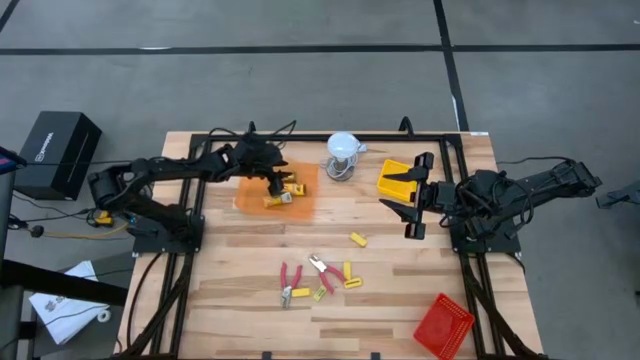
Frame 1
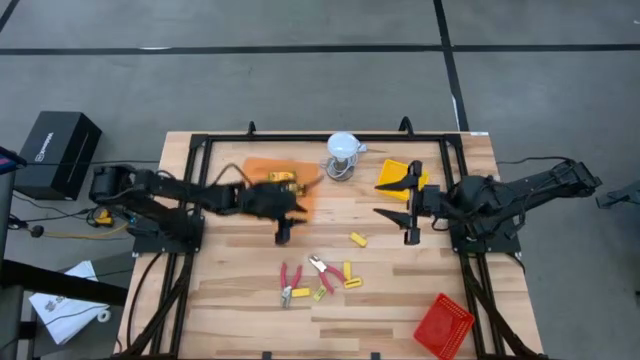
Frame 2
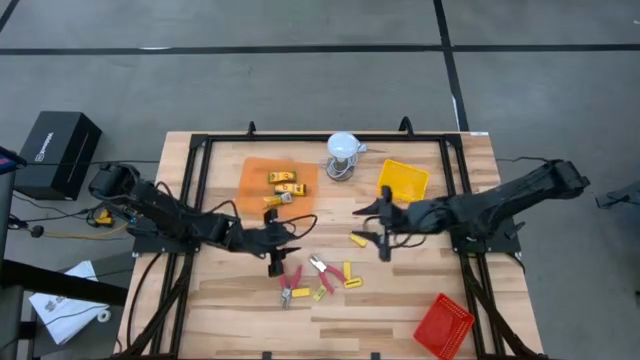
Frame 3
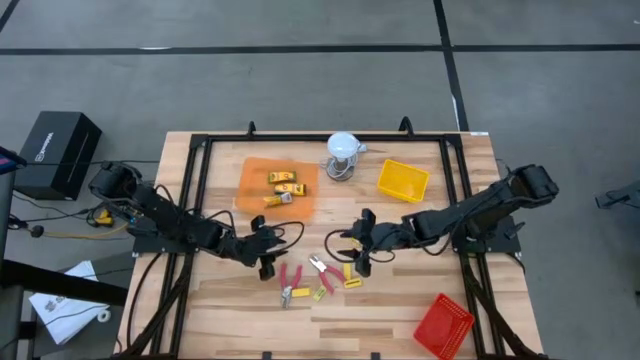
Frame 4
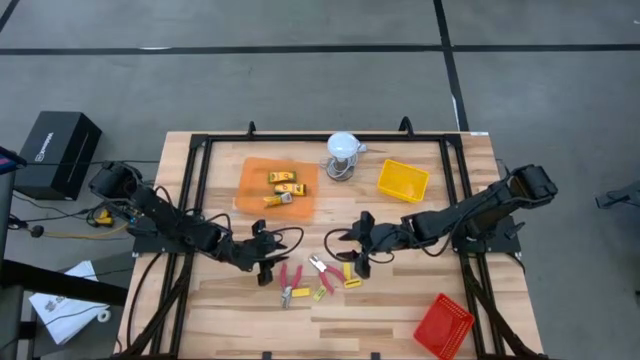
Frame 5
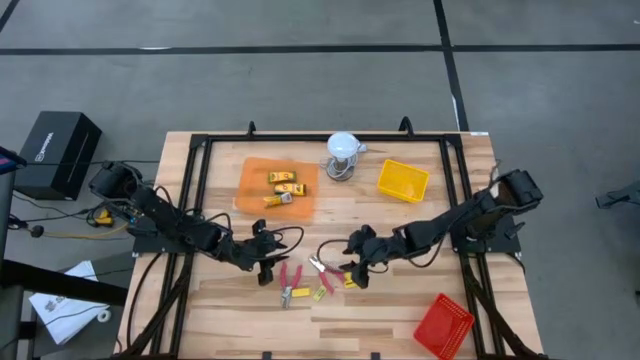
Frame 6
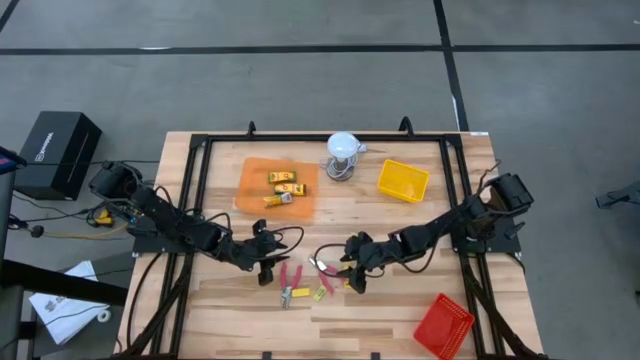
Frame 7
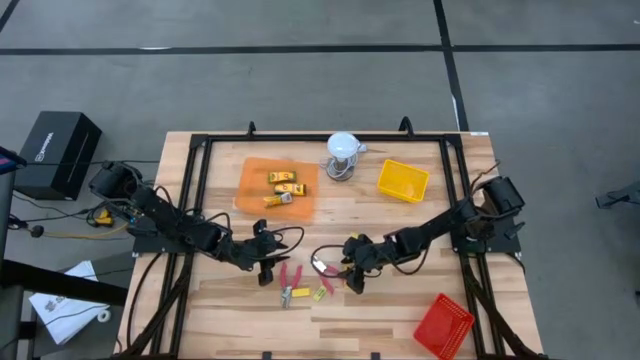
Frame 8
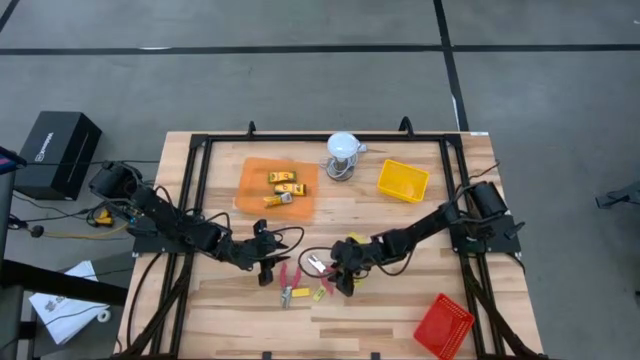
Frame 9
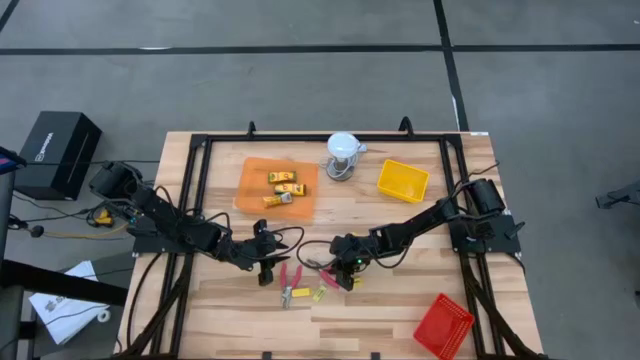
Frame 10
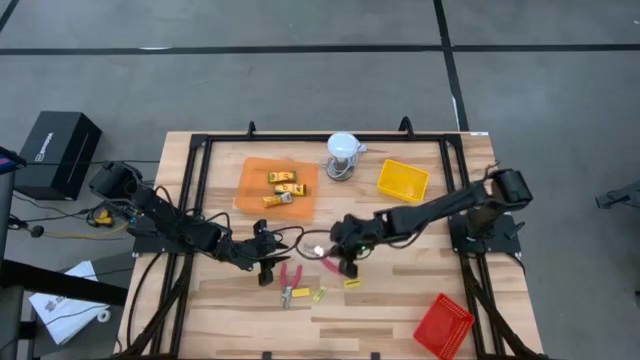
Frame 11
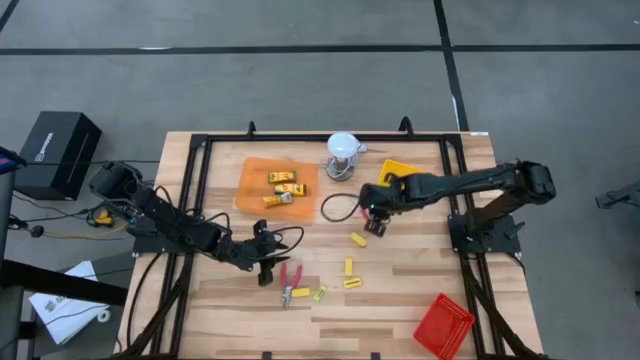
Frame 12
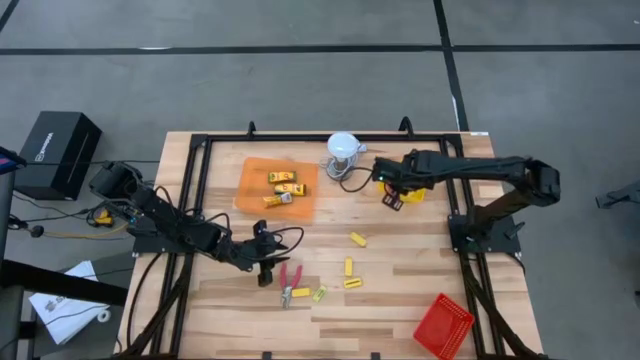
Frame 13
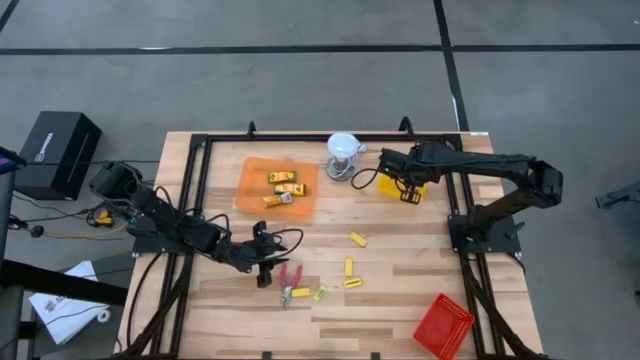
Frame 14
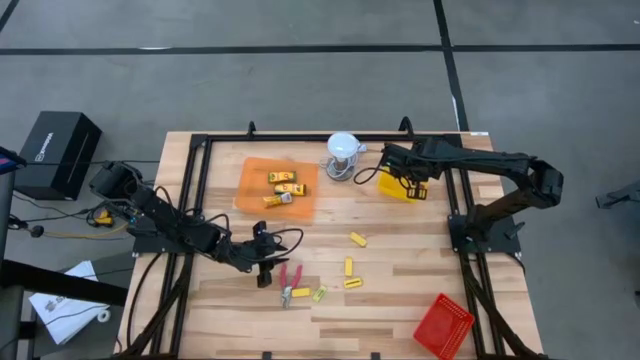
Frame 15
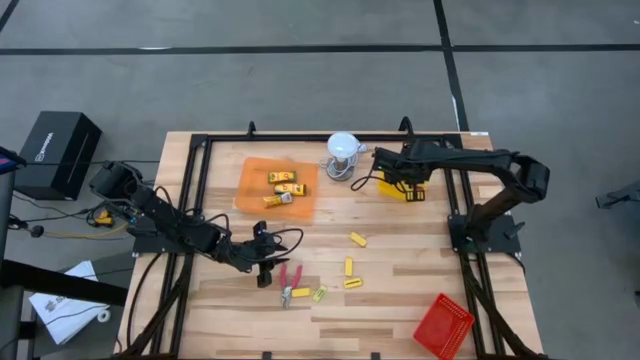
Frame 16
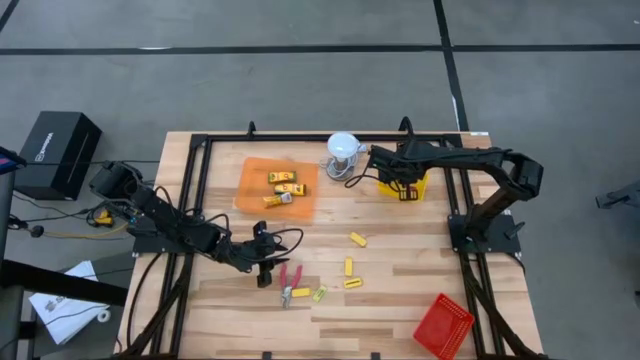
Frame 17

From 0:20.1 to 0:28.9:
Task: Pick & Place School Supplies
Put the pink hole puncher into the yellow bin

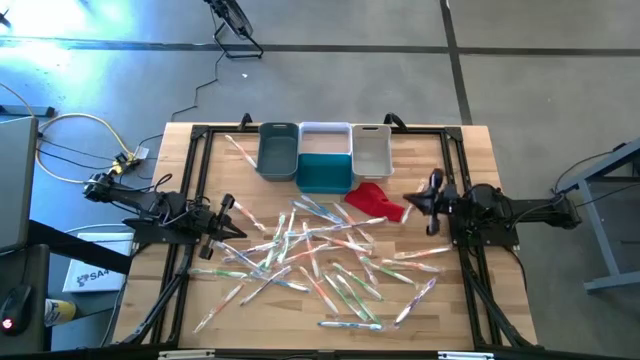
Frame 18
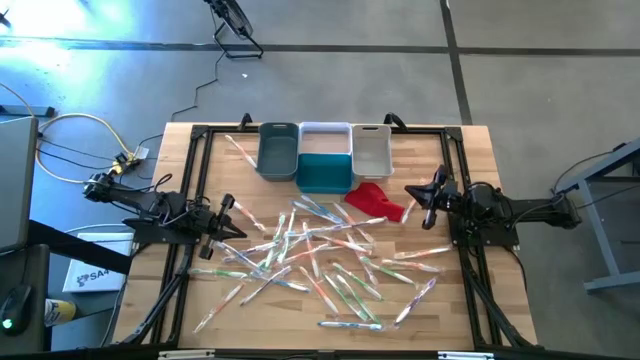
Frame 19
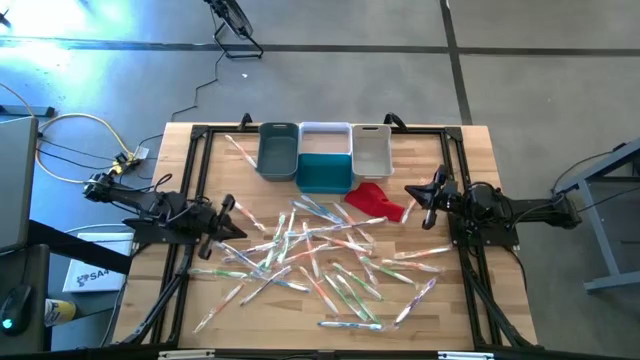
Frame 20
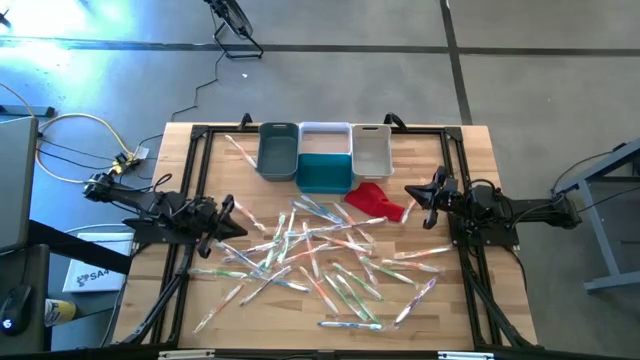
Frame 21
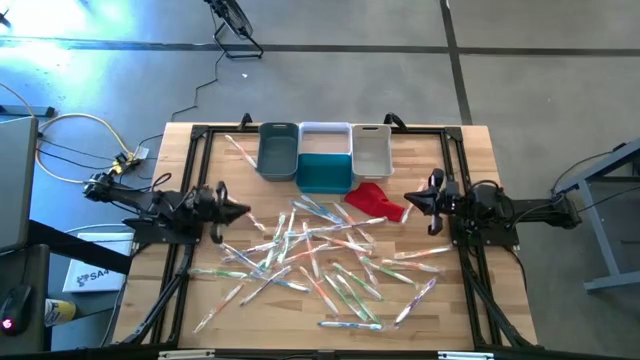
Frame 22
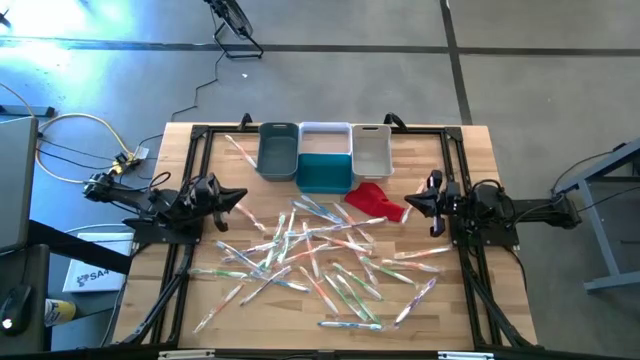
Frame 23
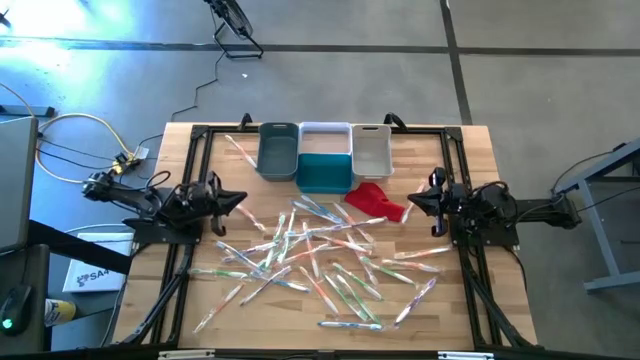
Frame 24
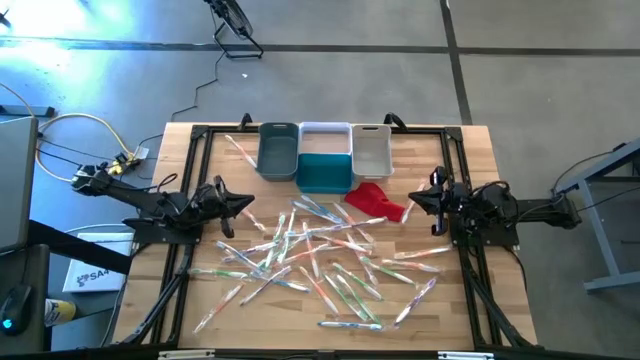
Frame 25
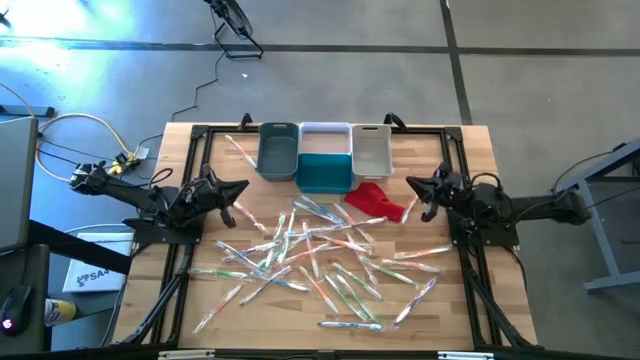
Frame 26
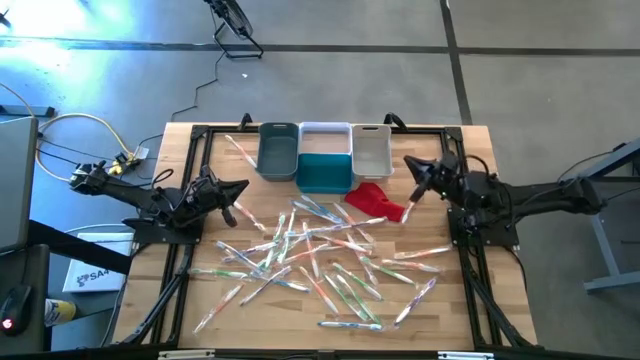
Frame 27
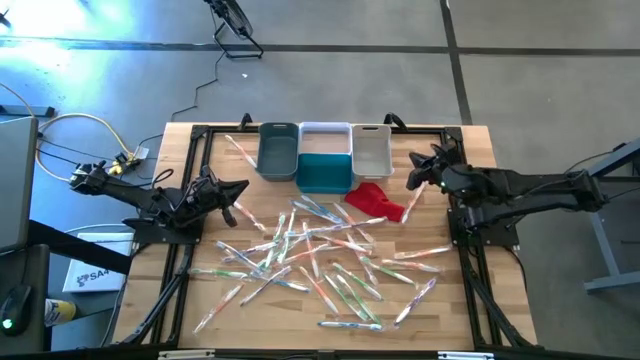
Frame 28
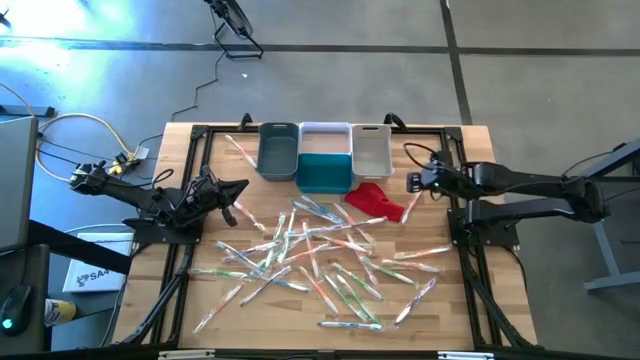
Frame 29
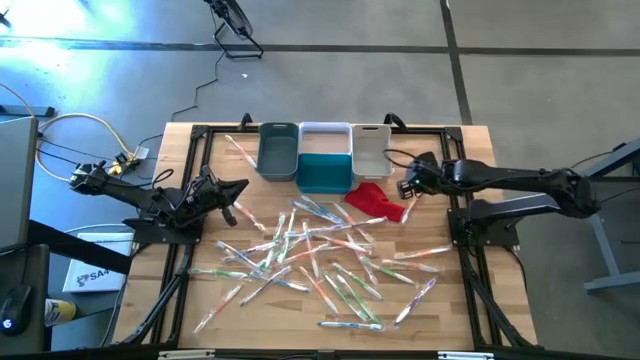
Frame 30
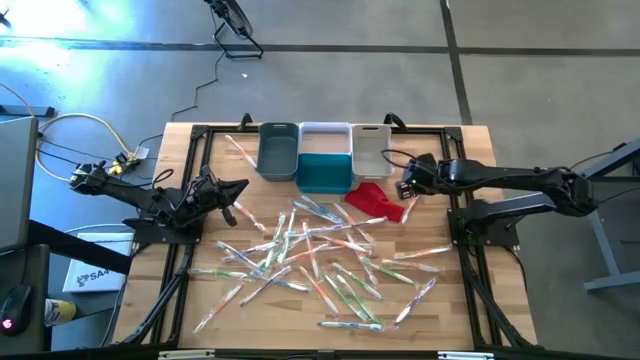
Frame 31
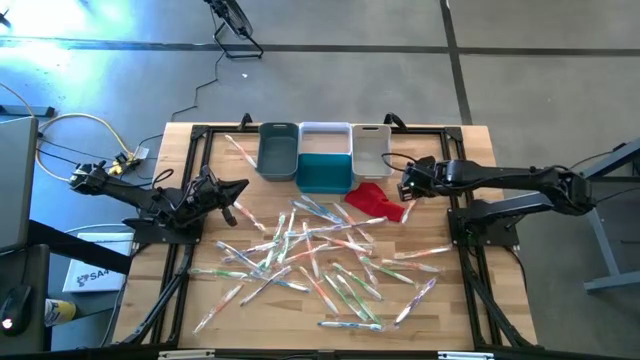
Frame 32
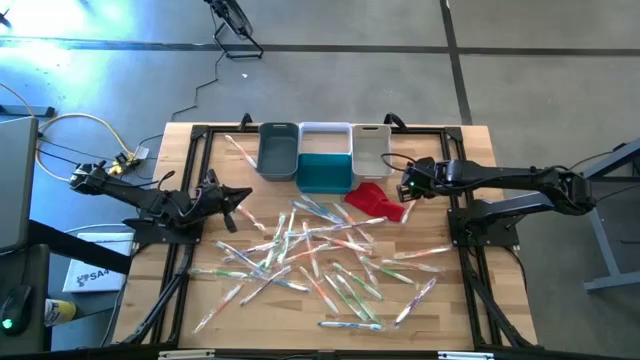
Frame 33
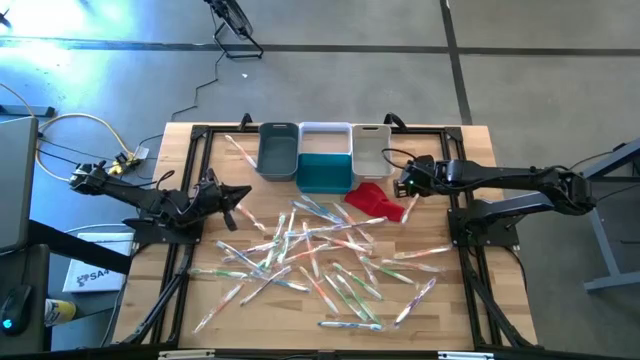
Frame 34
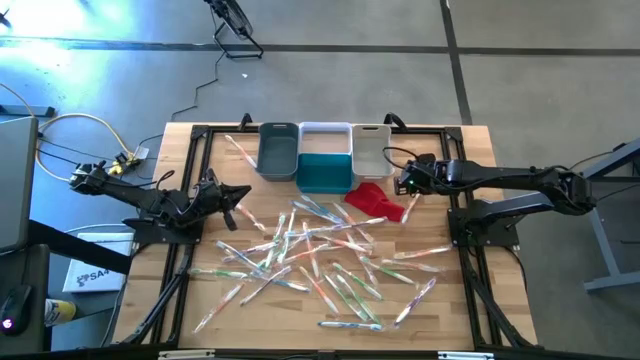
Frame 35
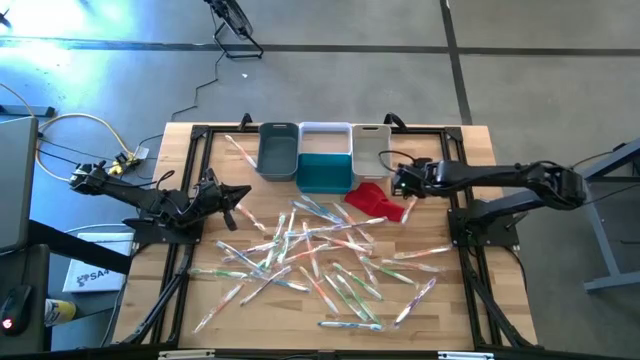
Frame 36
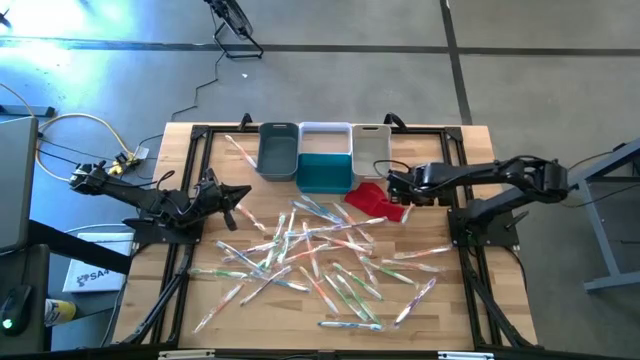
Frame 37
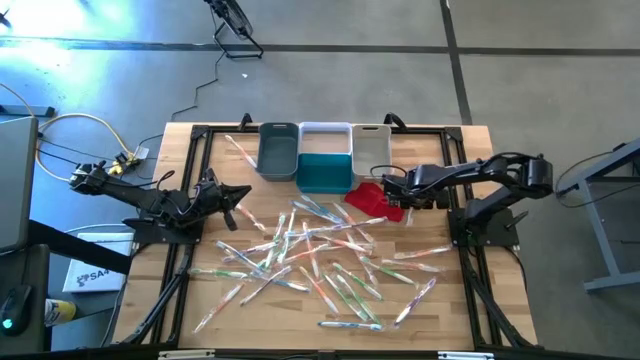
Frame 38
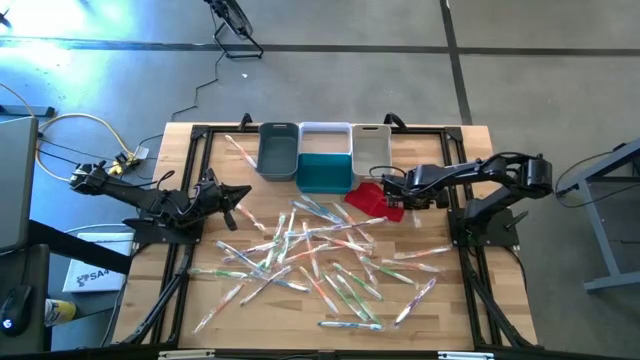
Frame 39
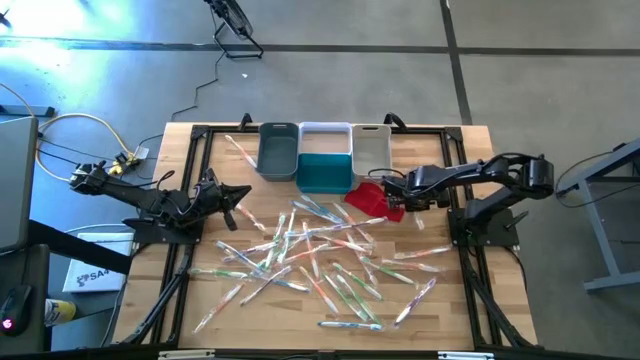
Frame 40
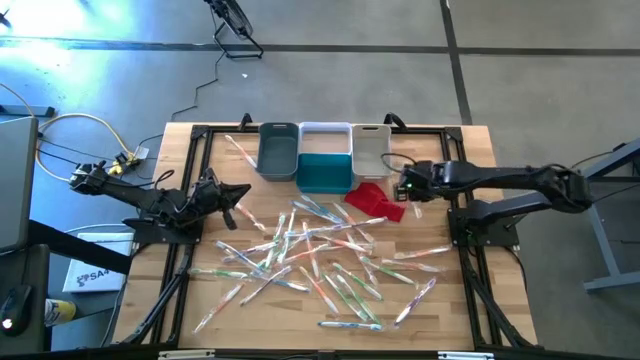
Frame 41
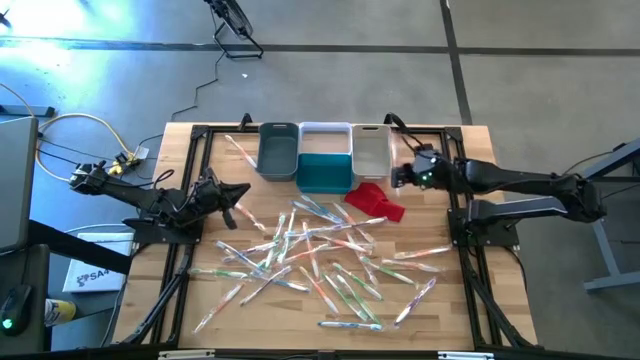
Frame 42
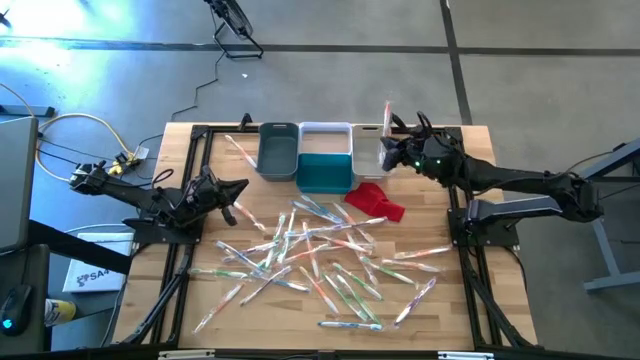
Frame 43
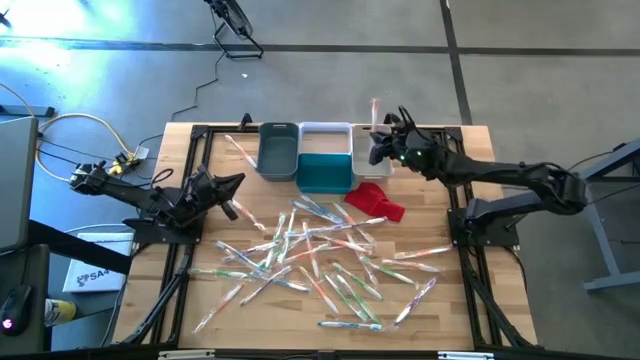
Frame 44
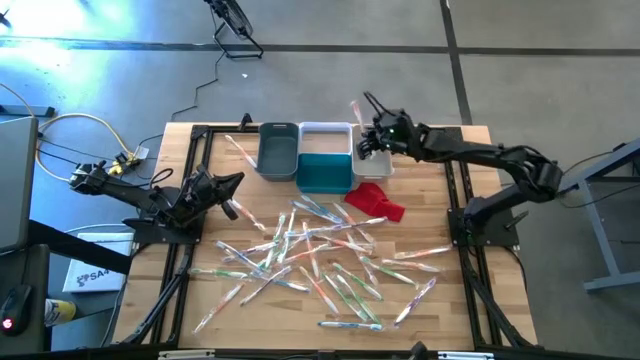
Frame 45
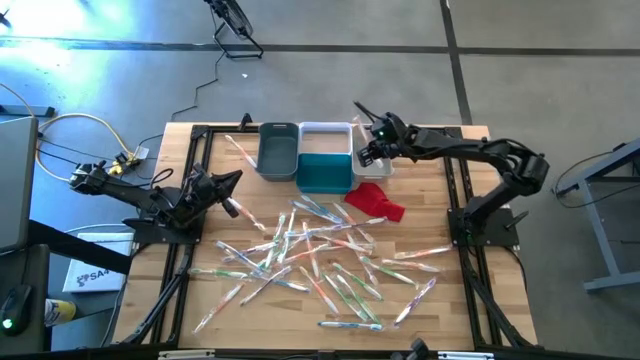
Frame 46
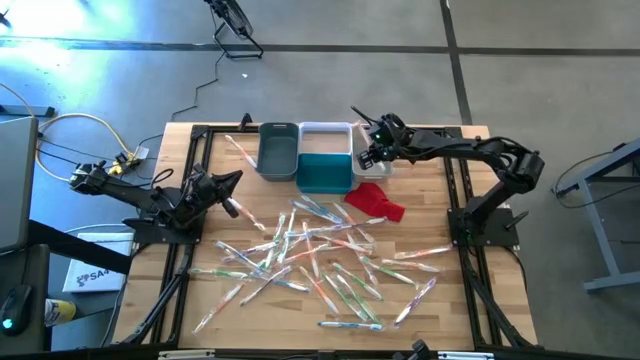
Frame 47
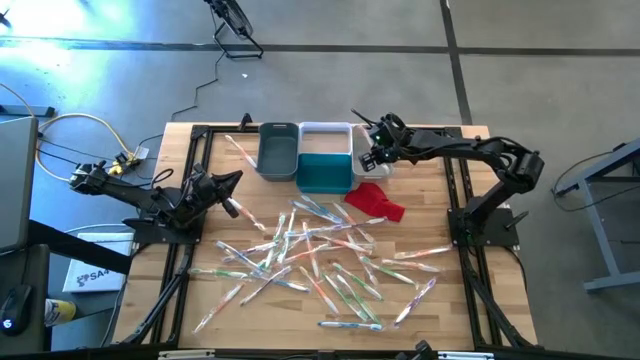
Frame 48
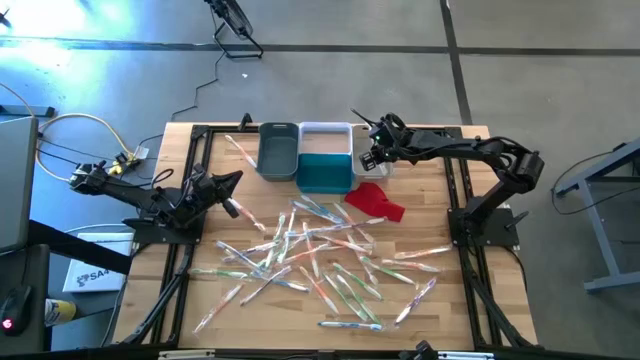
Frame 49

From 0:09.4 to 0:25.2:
Task: Pick & Place Toothbrushes
Put the orange toothbrush into the white bin
